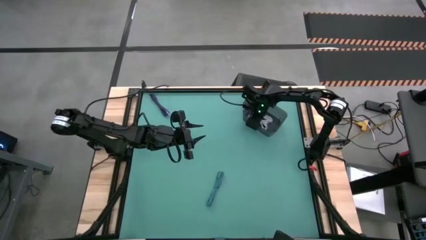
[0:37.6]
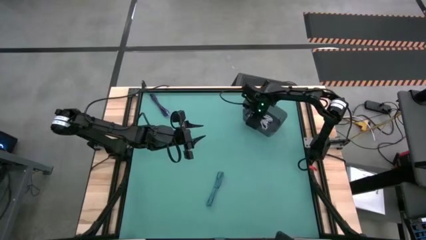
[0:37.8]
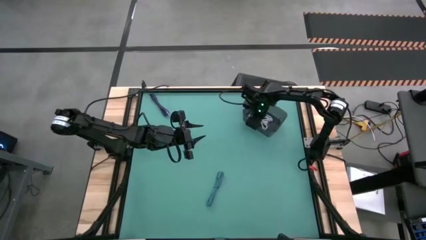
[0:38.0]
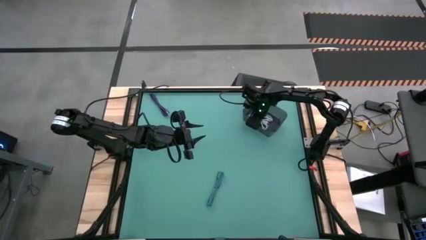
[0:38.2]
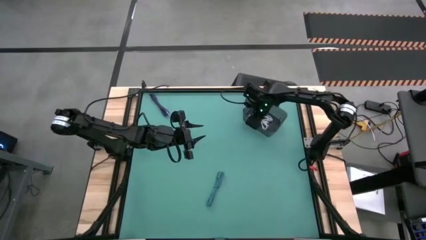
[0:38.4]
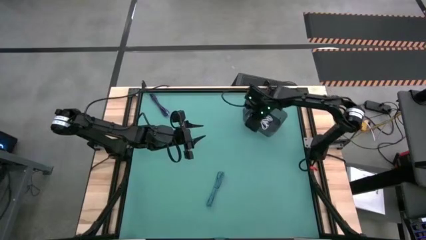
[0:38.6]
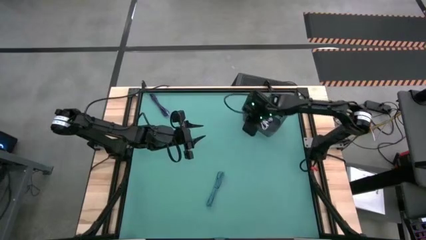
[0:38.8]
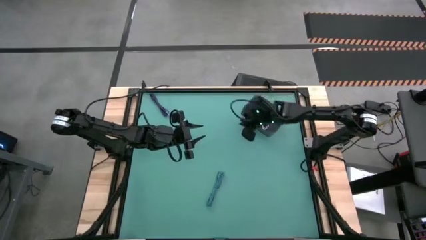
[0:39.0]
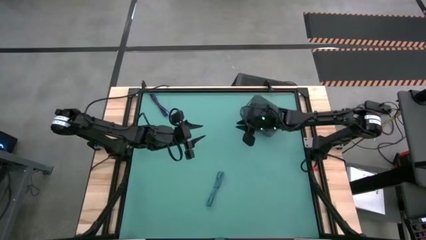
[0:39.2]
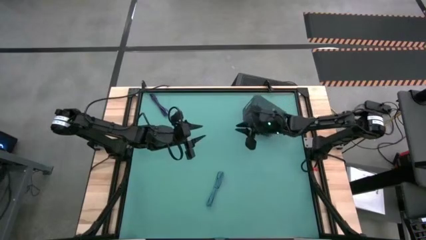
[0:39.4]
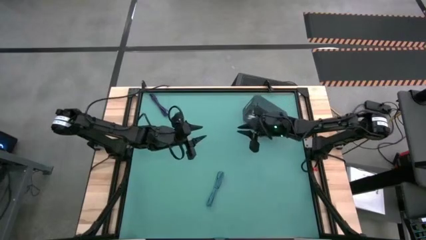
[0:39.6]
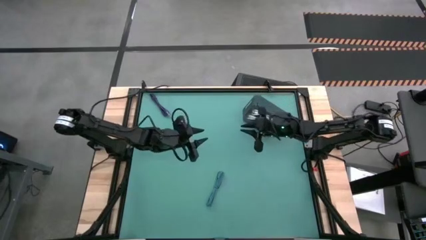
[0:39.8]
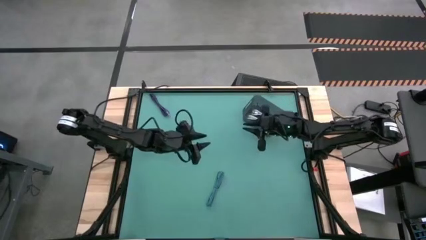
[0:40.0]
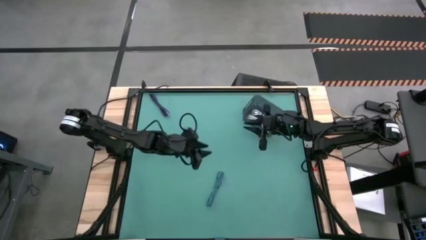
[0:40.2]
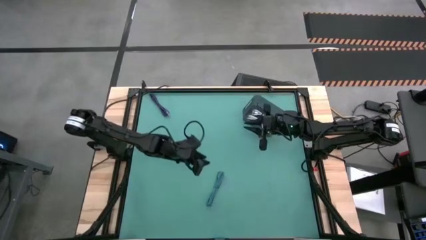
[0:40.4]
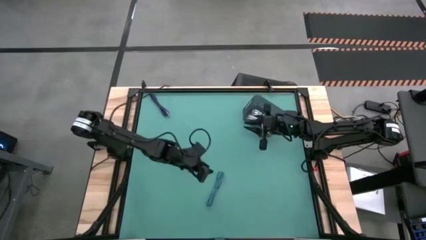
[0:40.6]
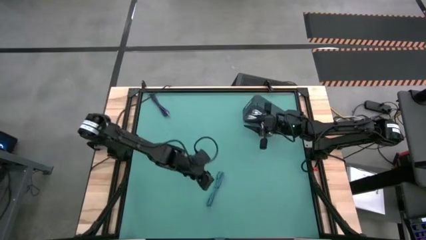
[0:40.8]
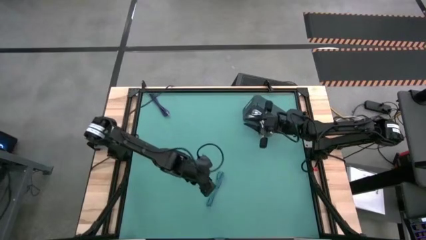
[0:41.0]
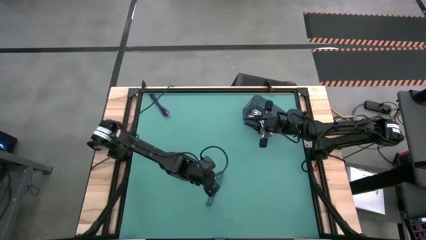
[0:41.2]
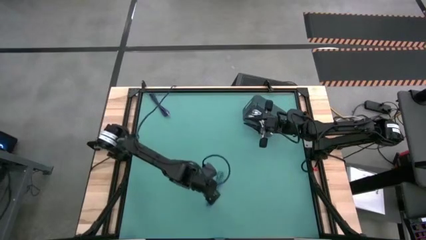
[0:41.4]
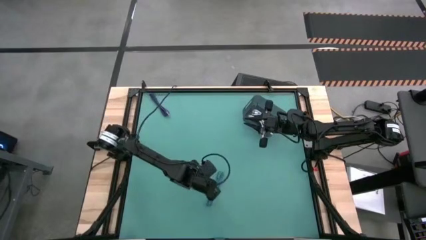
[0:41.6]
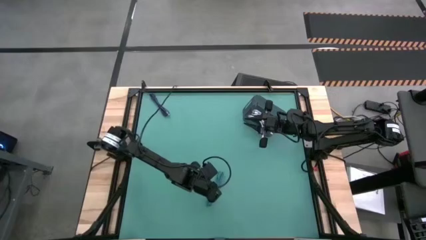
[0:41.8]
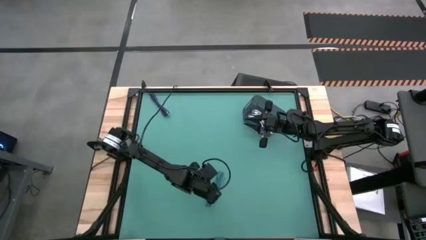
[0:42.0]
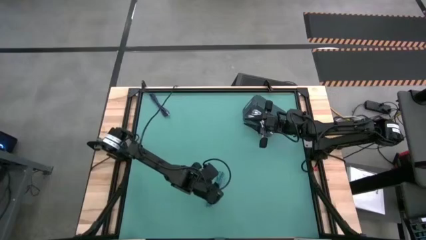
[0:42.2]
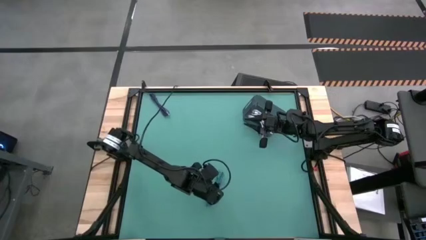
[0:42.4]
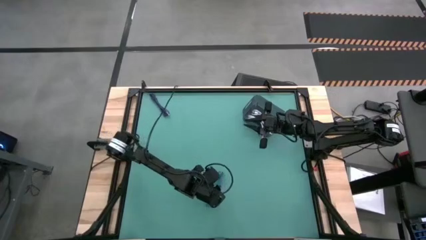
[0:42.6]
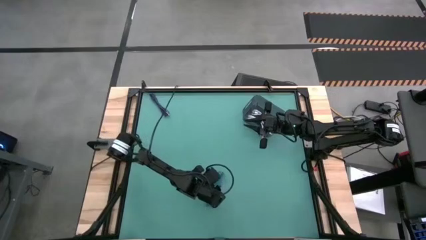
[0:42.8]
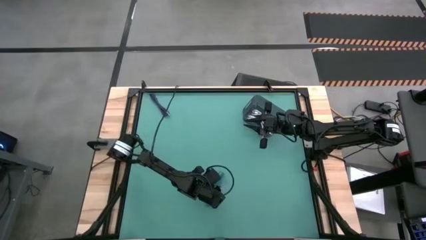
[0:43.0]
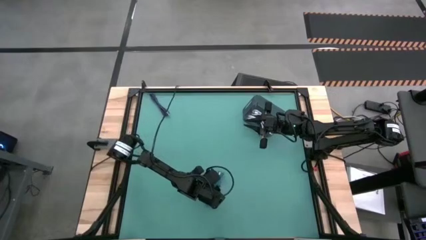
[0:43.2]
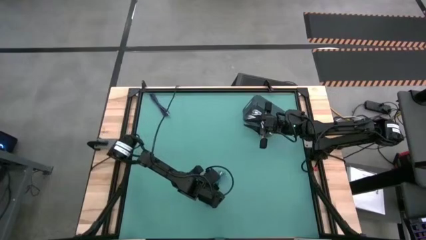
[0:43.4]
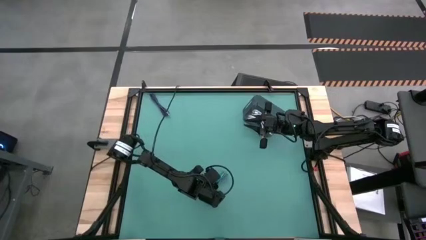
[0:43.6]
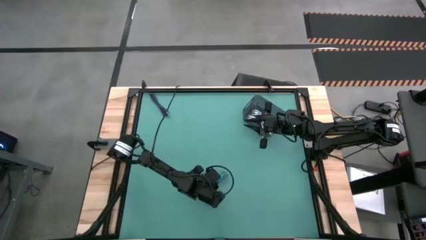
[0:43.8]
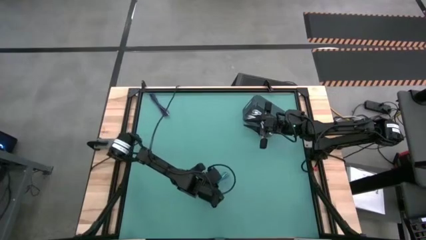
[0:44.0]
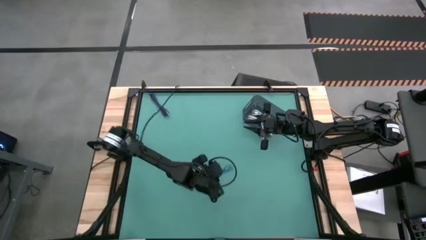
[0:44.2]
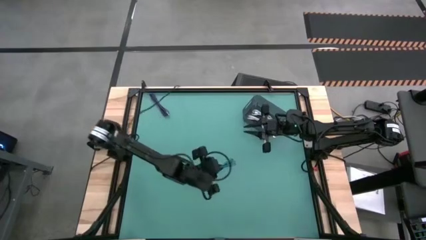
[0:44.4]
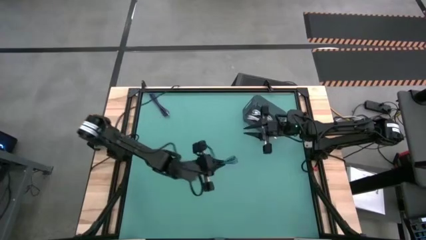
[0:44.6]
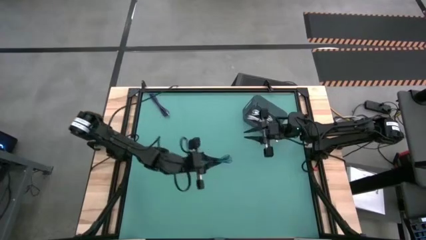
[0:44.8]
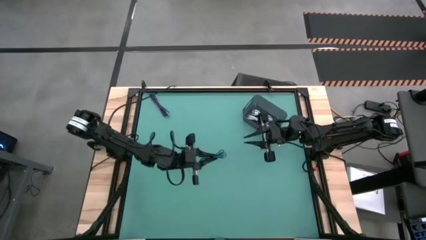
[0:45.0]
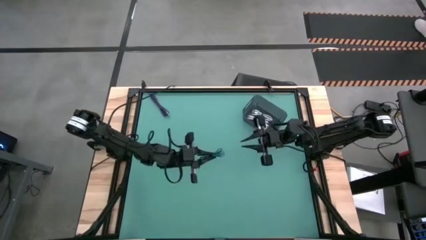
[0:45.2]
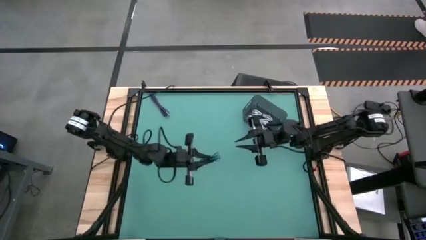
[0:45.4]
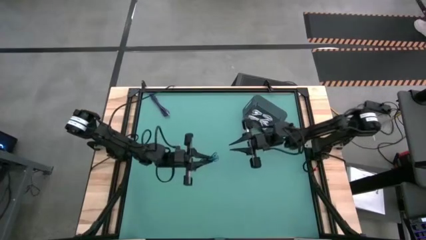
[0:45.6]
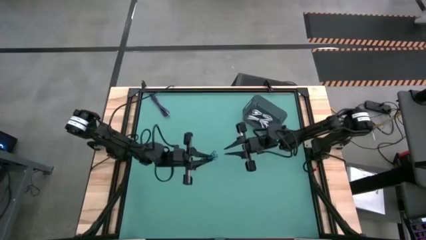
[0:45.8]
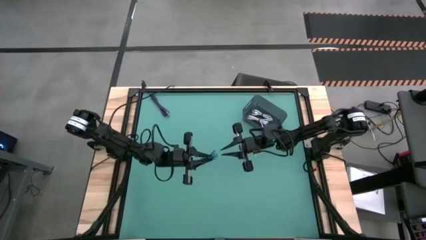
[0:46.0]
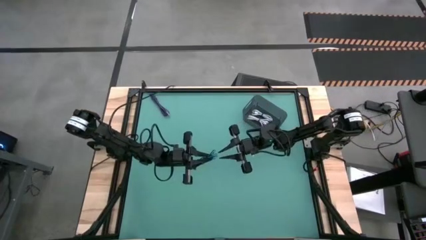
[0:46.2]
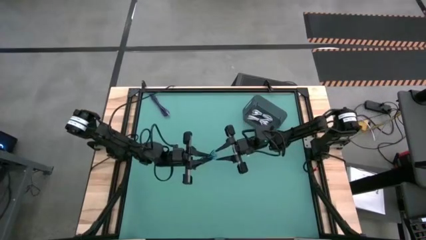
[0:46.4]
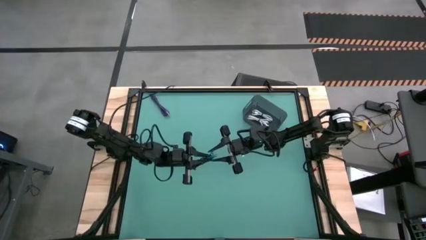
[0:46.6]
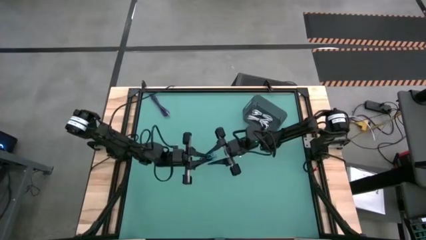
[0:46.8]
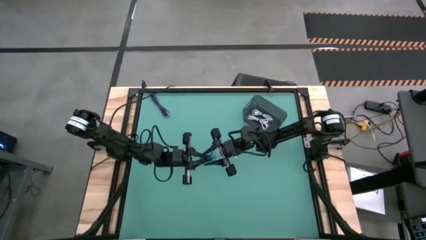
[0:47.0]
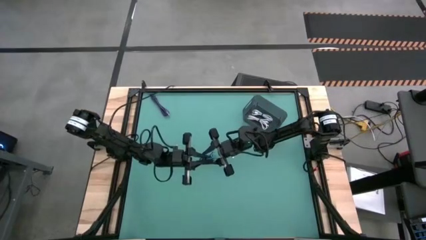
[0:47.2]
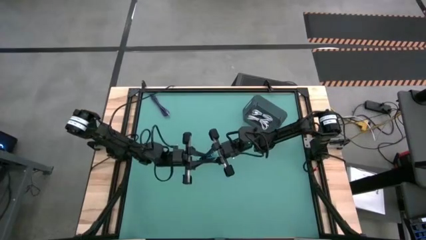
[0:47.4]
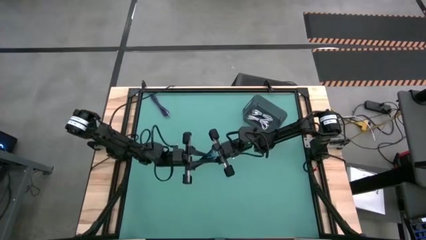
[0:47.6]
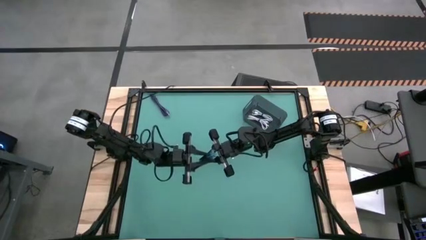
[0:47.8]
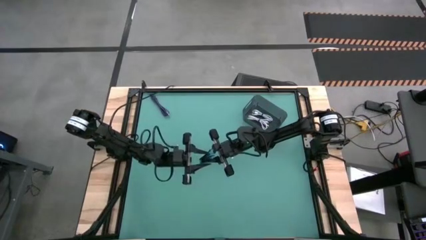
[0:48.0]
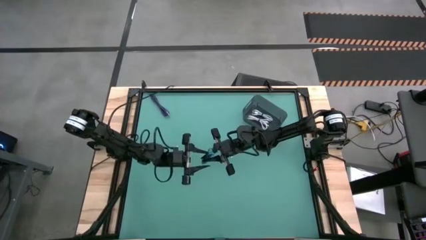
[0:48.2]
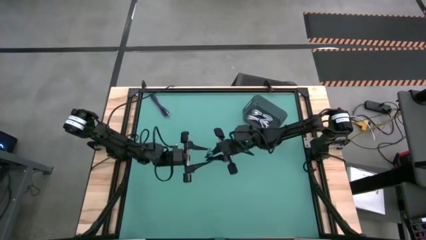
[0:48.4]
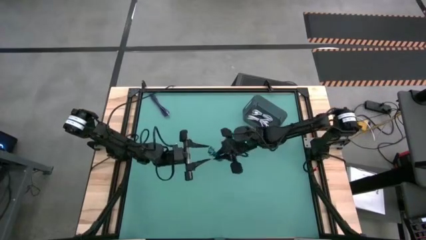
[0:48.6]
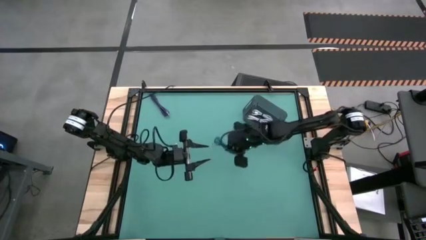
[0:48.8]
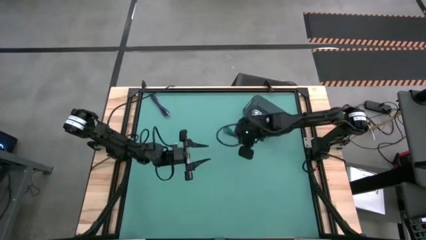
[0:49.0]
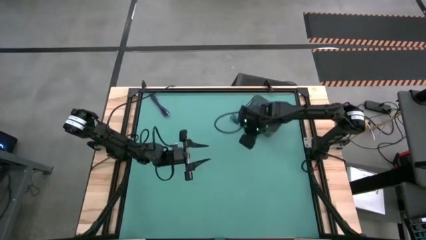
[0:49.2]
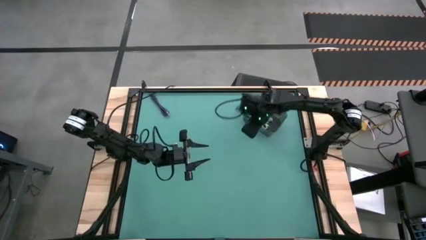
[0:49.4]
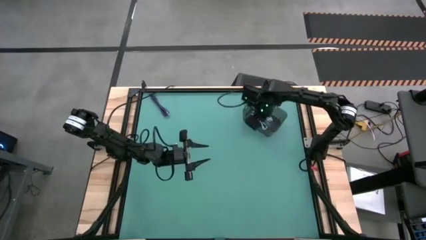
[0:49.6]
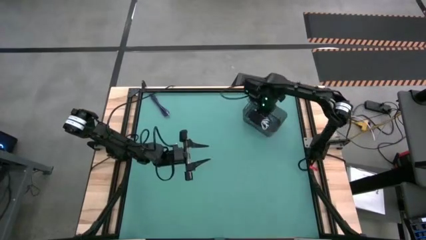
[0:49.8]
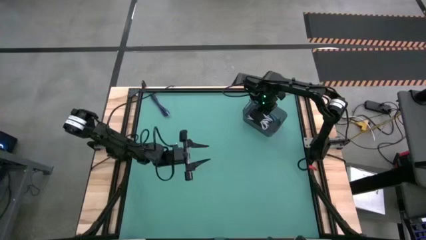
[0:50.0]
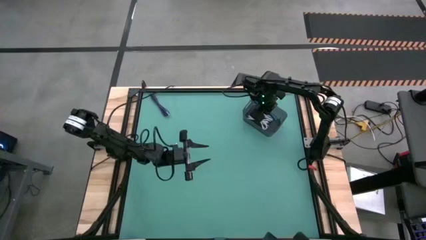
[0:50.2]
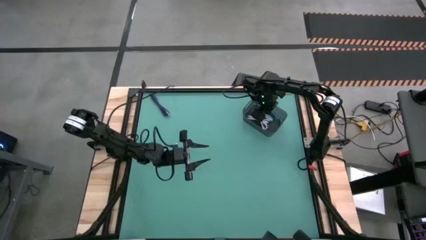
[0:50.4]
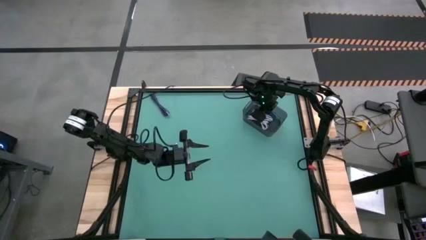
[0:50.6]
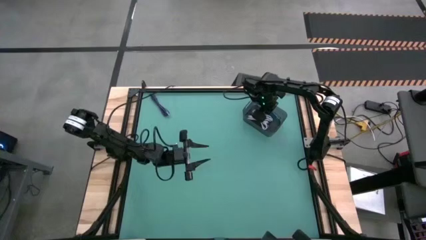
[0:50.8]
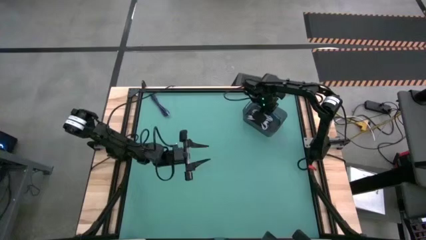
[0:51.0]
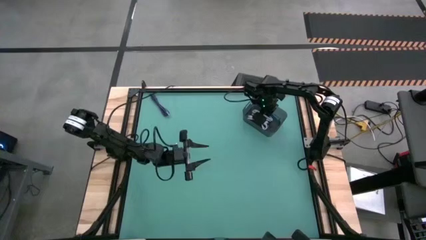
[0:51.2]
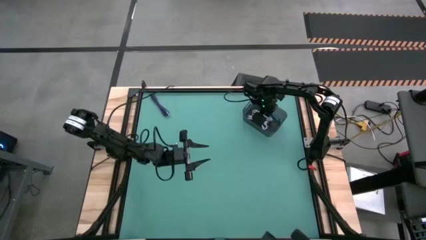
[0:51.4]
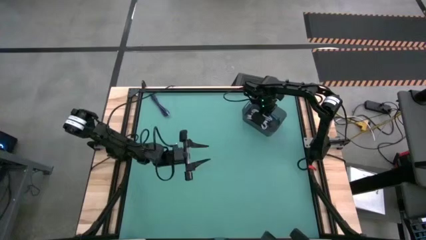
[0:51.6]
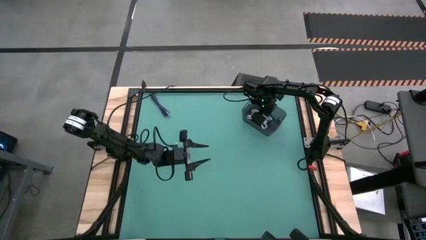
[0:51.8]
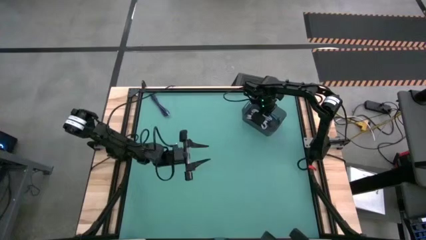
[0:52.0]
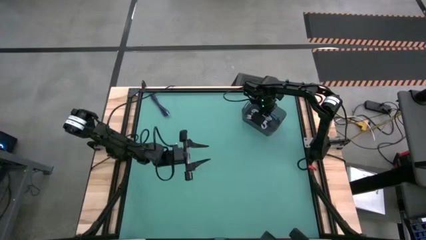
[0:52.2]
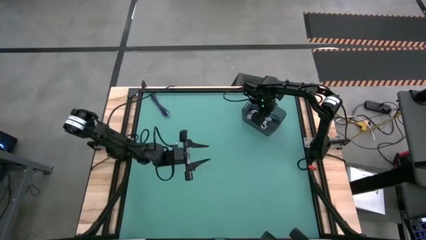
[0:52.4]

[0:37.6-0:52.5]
Task: Pick and place USB-C Cables
Put the blue charger cable into the black container

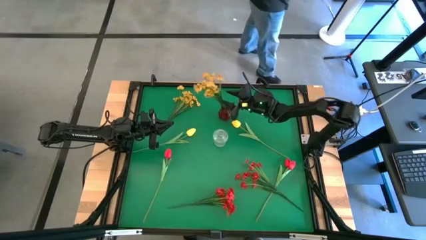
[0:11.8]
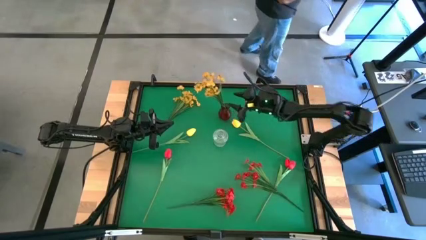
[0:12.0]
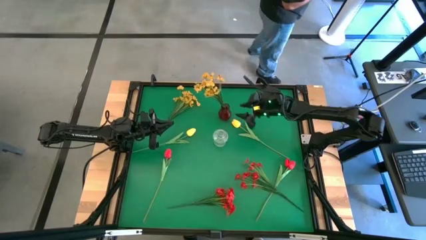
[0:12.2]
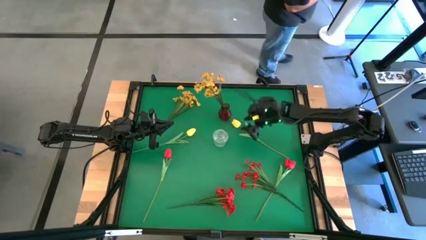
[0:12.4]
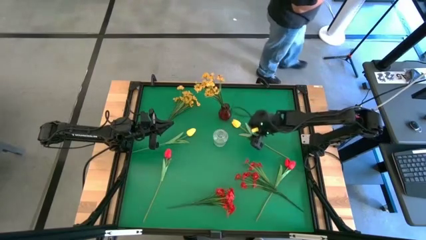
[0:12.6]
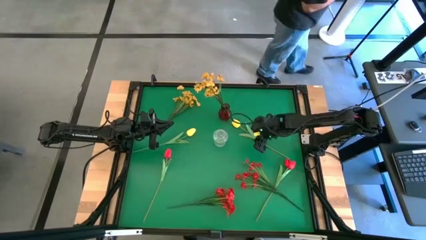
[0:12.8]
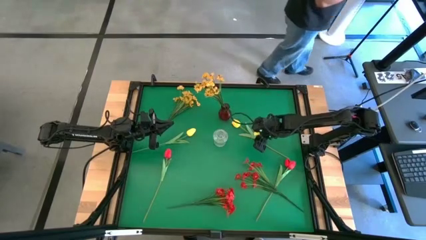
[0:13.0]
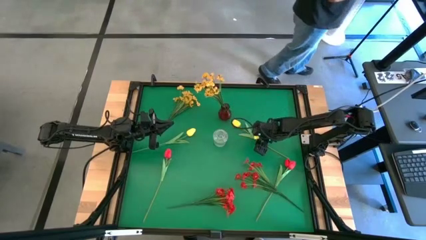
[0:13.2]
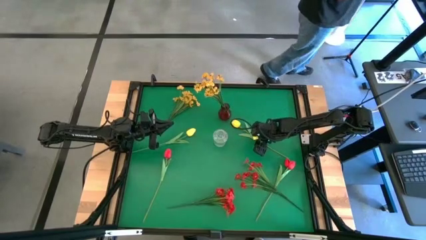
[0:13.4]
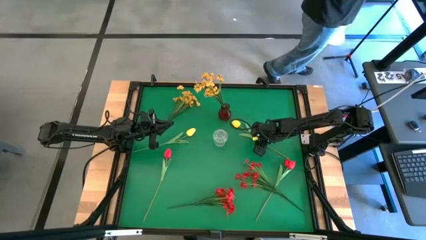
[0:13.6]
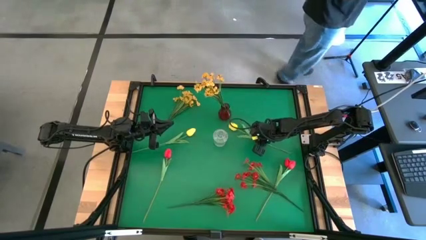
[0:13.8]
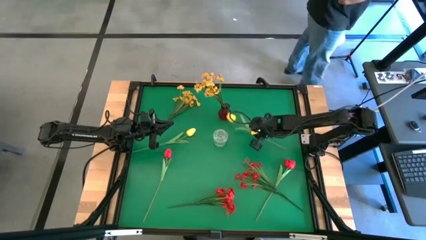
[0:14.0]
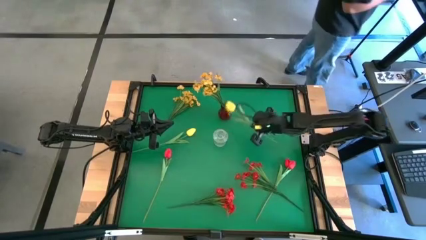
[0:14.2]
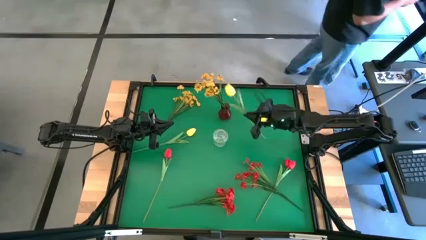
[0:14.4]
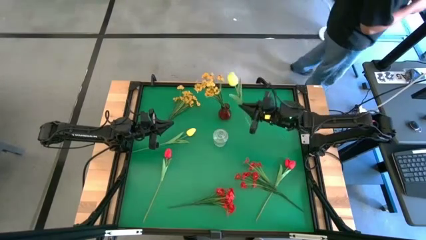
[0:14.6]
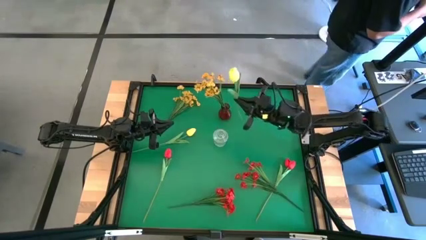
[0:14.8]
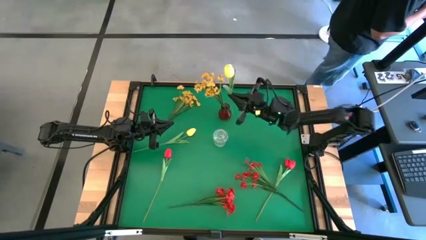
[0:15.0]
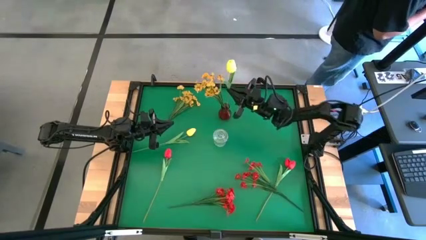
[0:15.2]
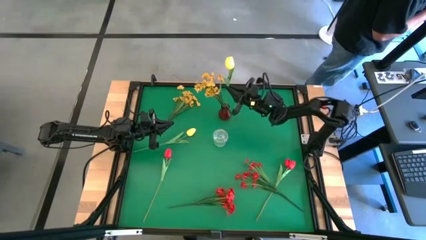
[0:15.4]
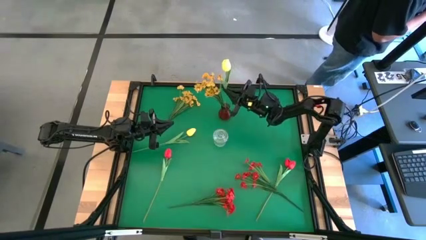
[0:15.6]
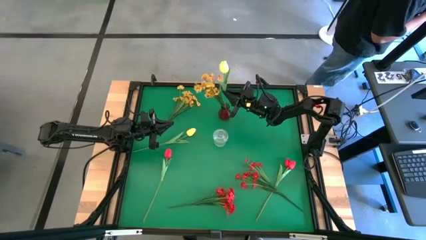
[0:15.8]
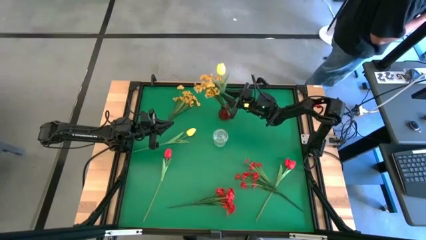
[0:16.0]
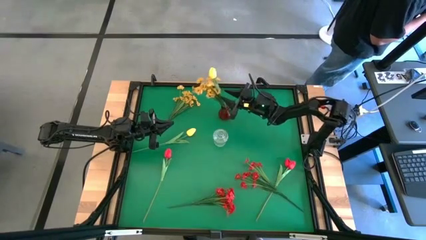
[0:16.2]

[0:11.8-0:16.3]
Task: Sort flowers into vase by color
Put the yellow tulip into the red vase
